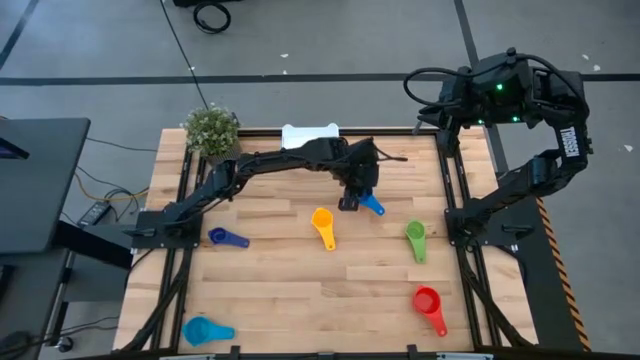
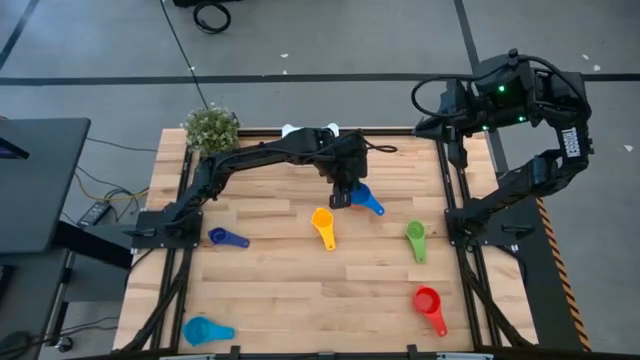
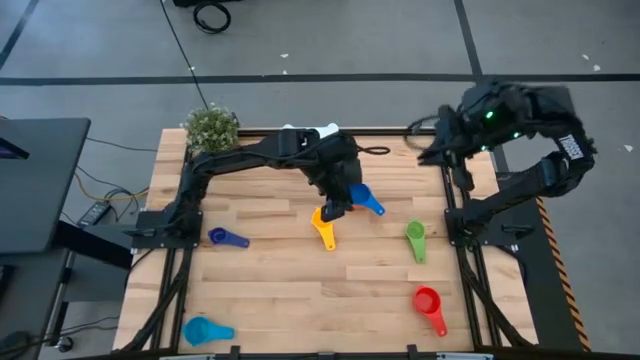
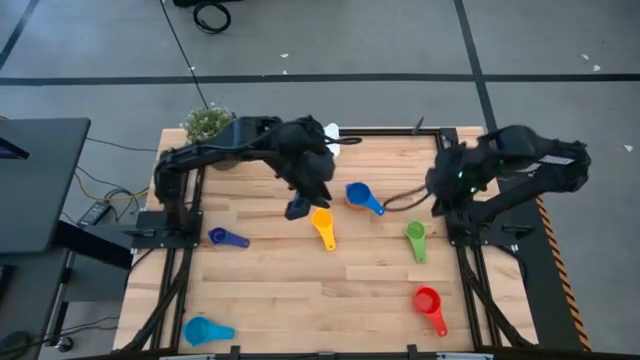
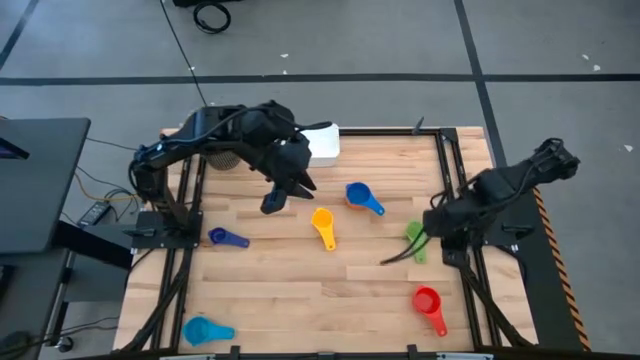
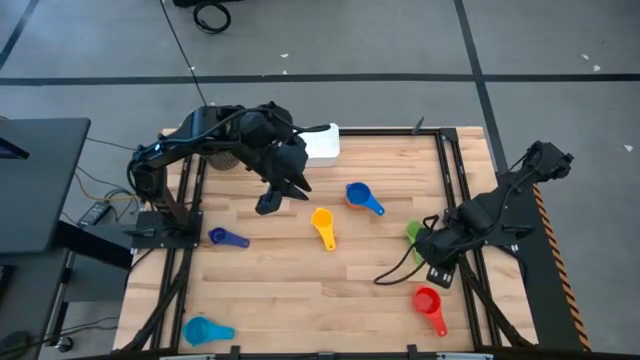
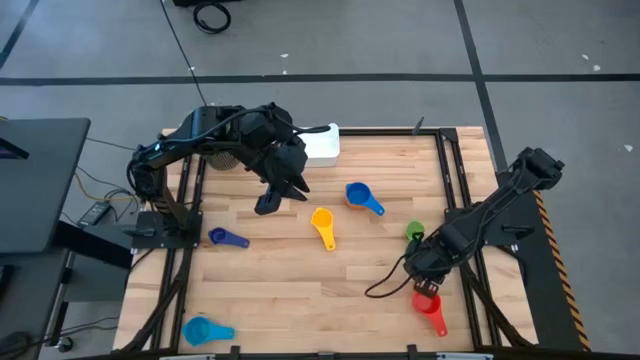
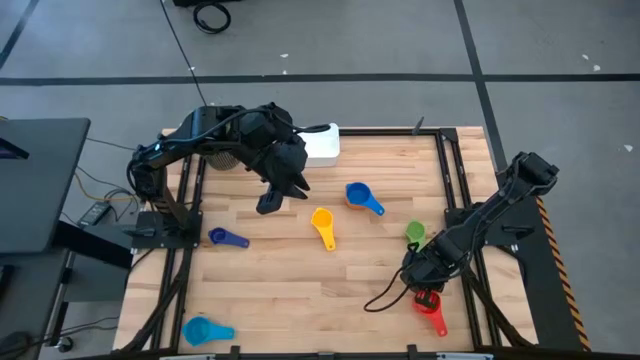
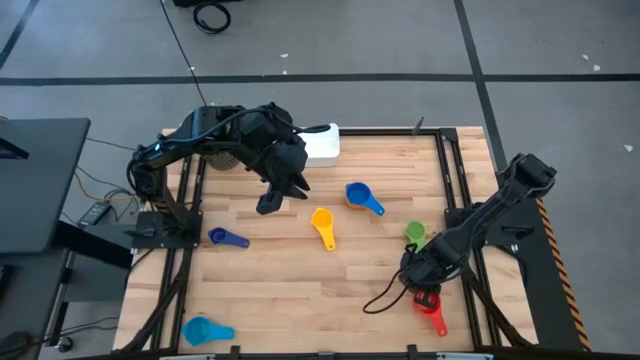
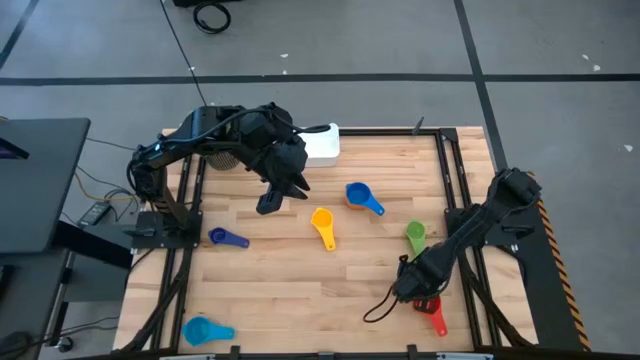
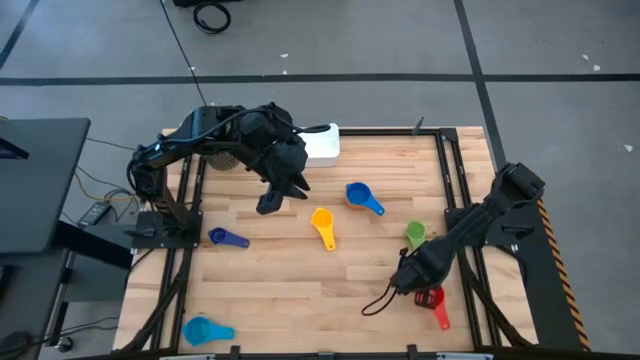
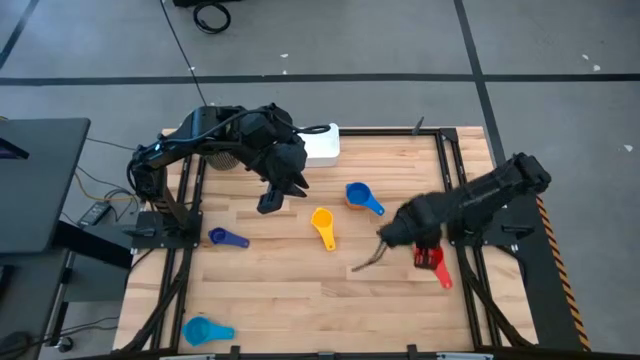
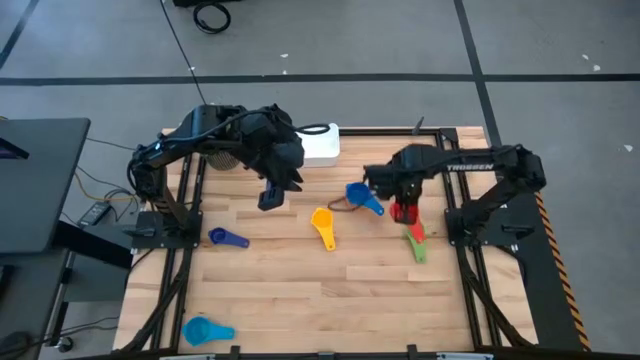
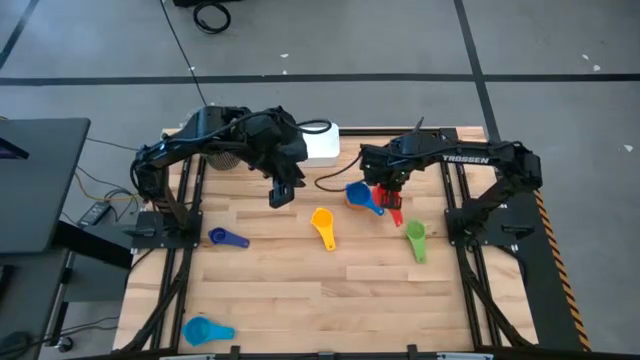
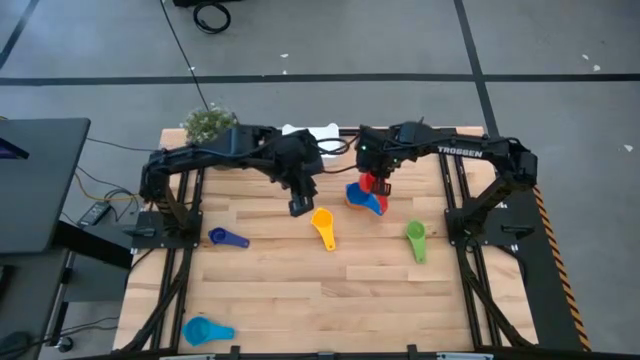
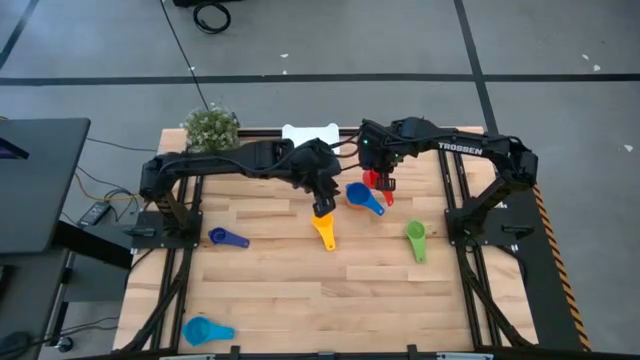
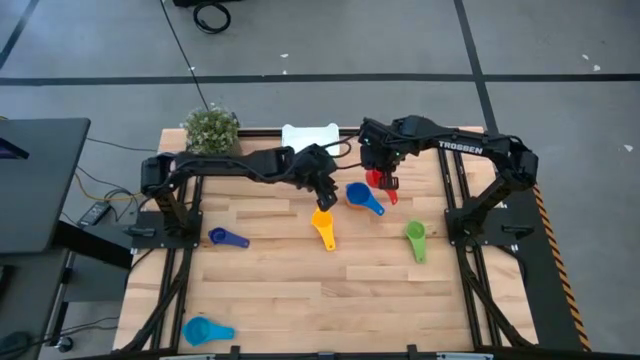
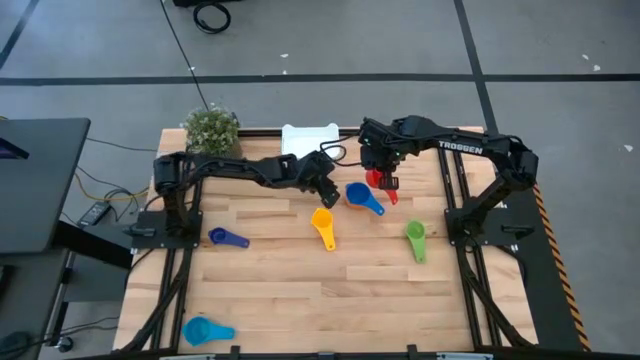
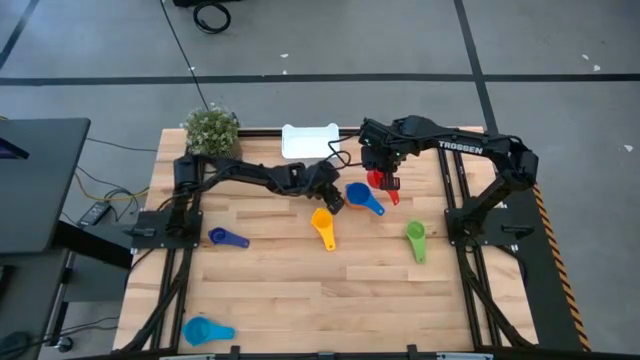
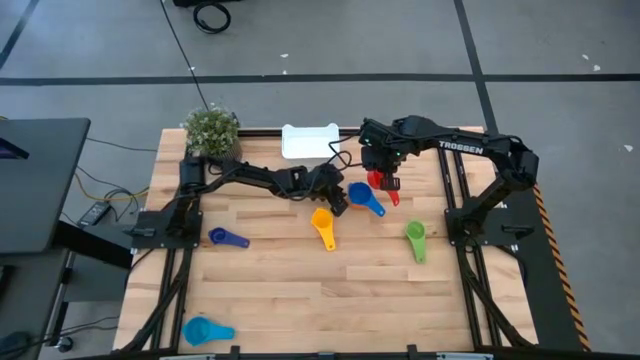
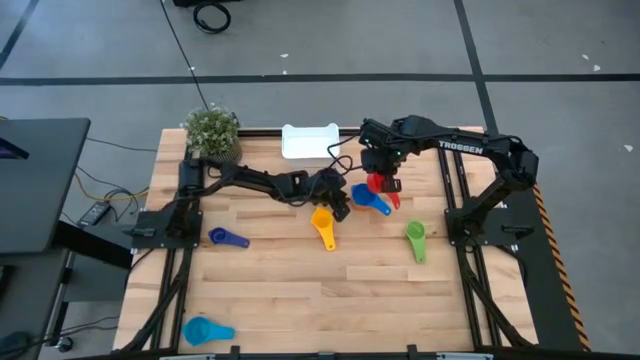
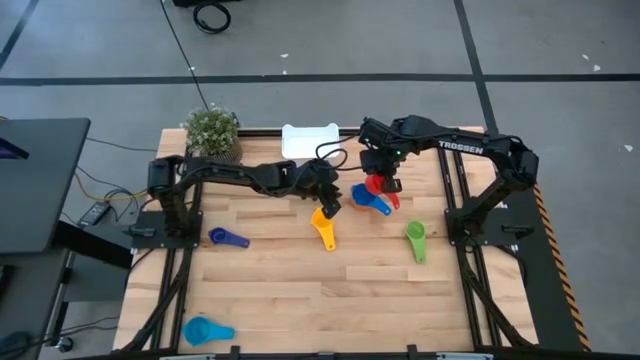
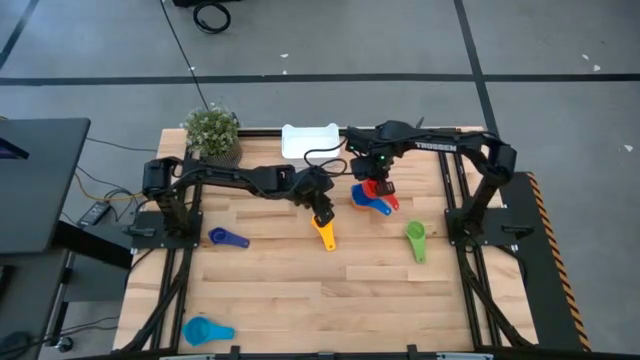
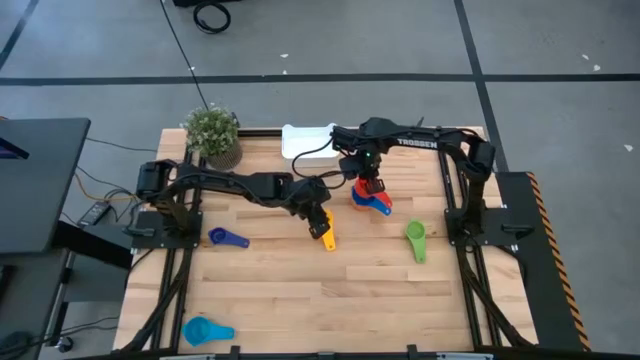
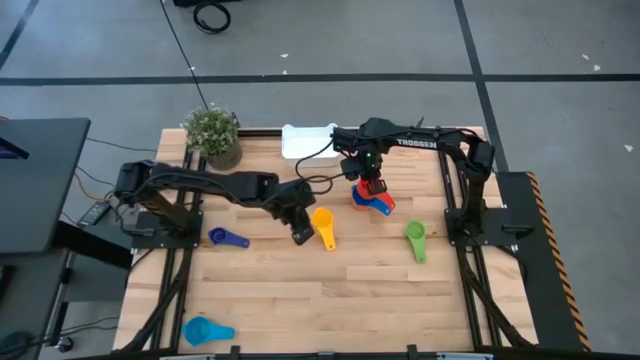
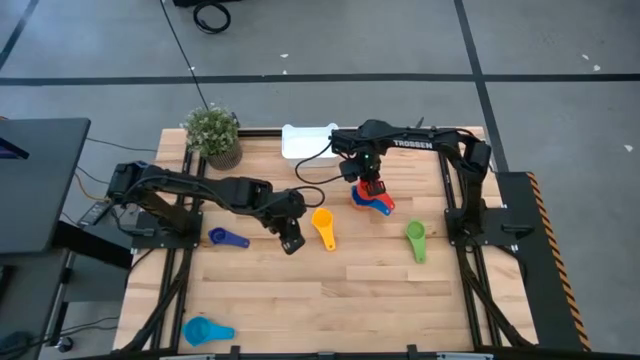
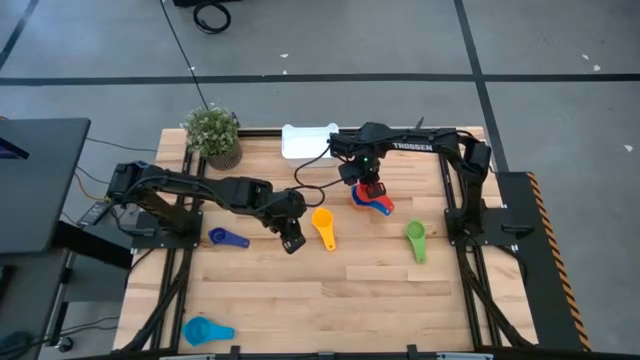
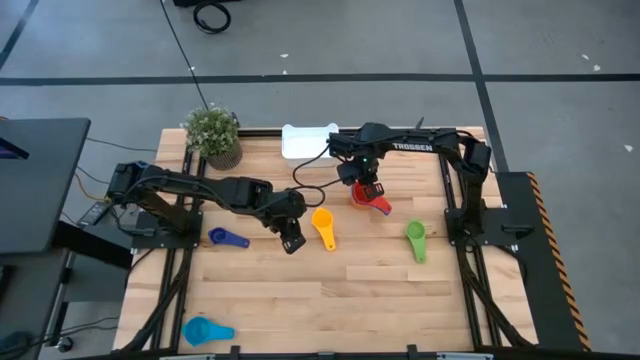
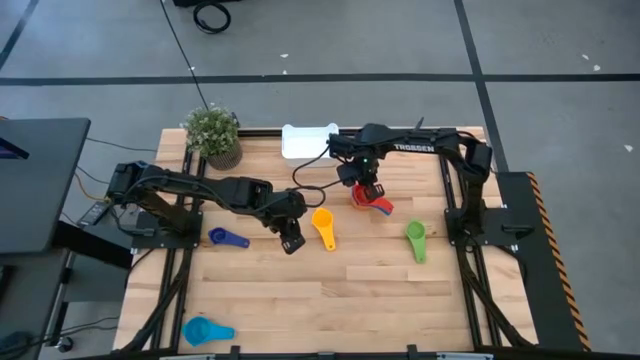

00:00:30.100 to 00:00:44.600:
Task: Nest measuring cups in basket
Stack the red measuring cup on top of the blue measuring cup

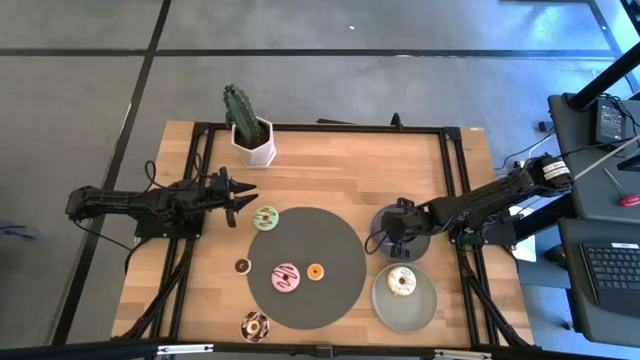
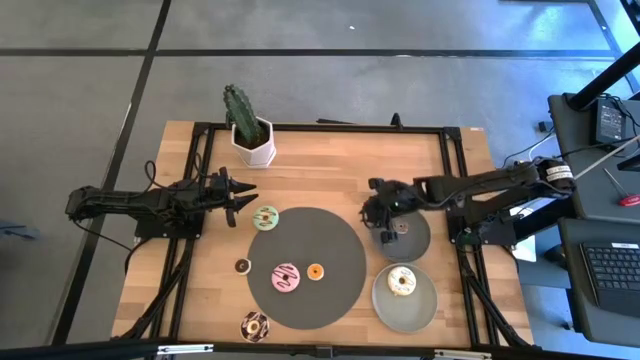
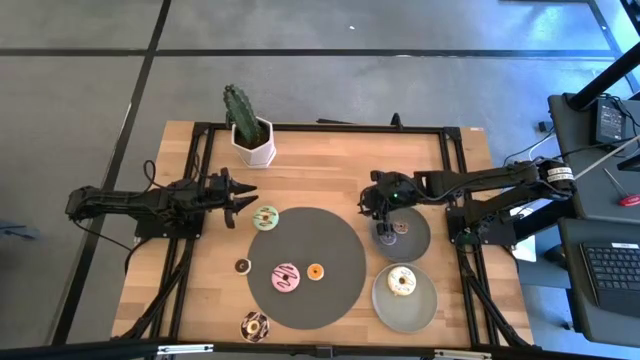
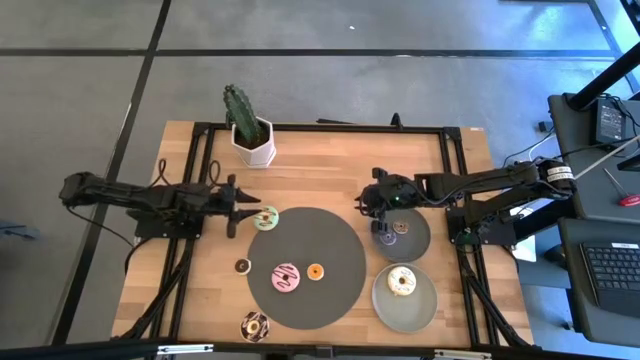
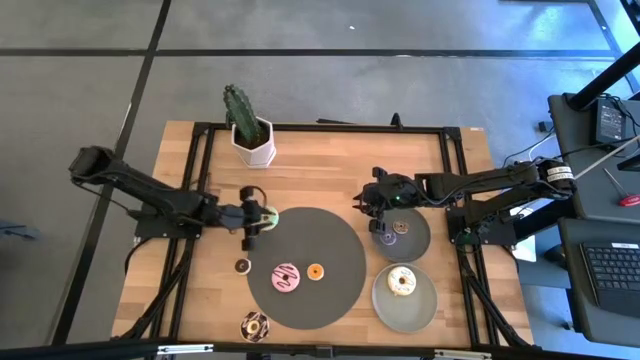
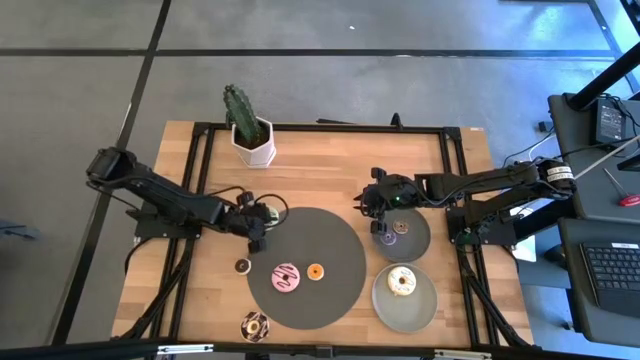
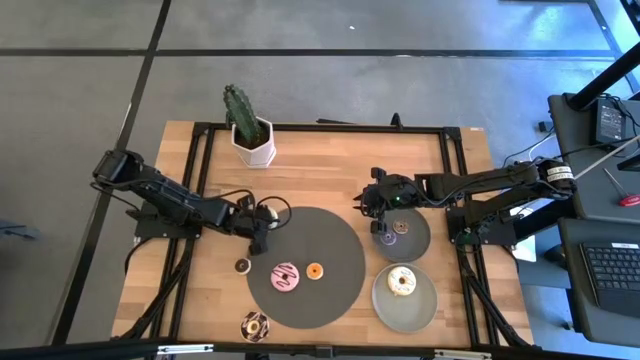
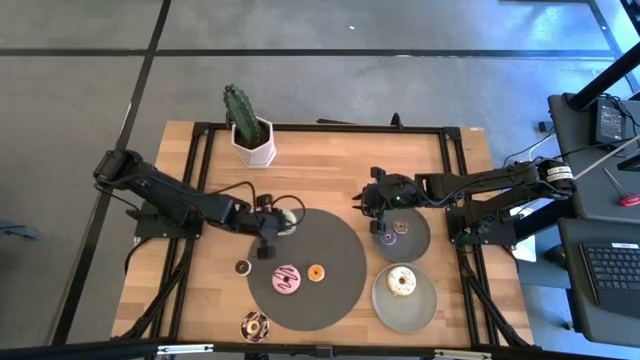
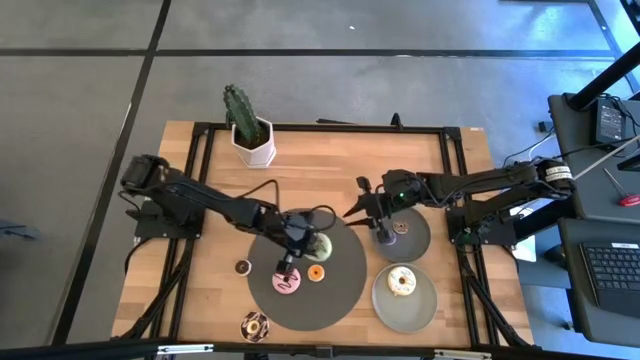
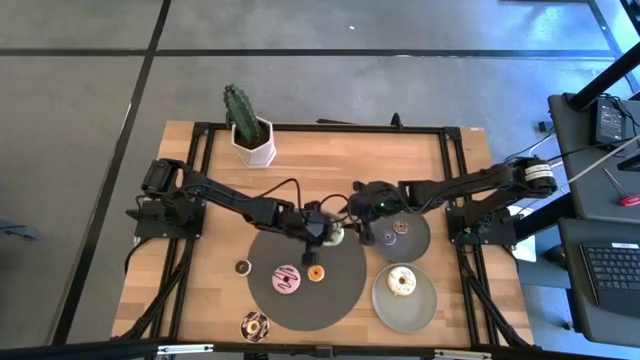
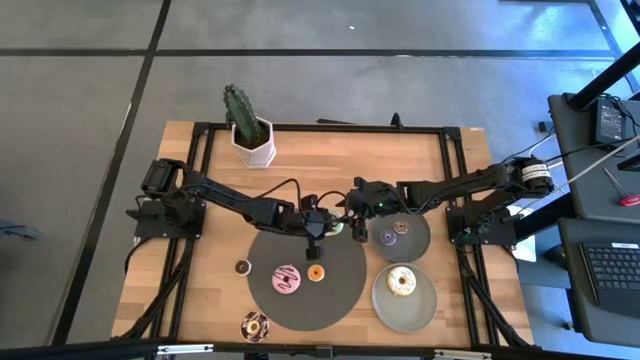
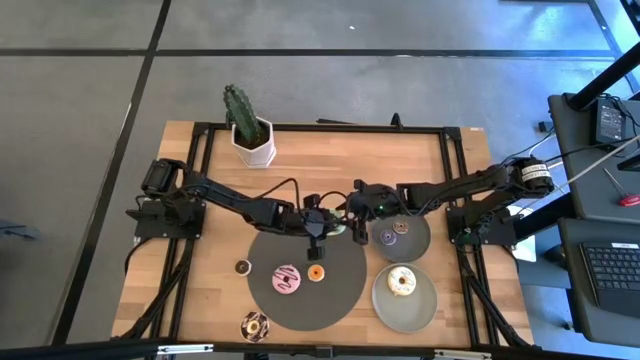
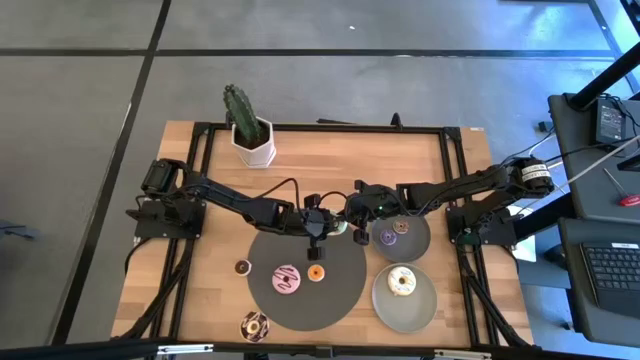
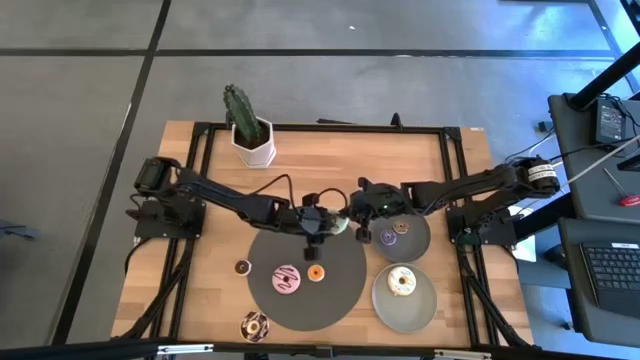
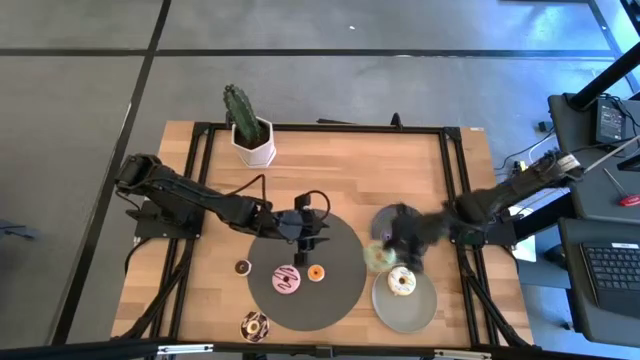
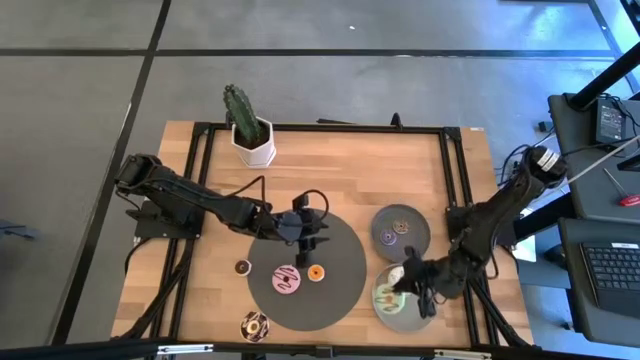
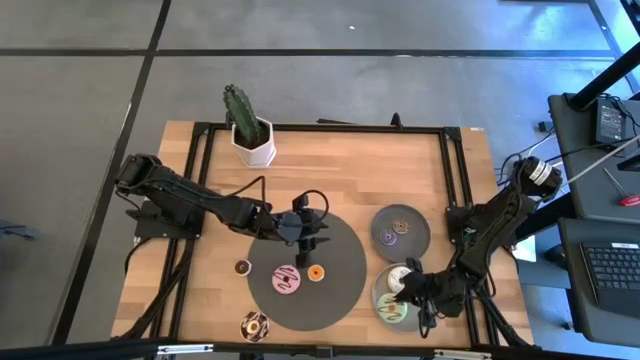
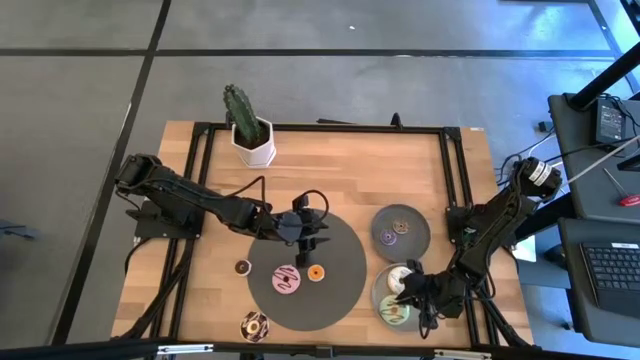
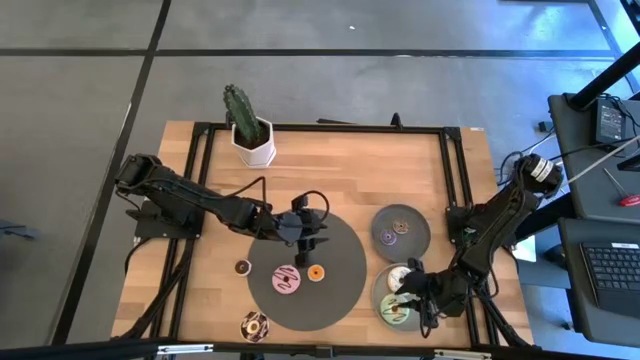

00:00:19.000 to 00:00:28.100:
Task: Pick & Place donuts
Put the large green donut on the light gray plate
